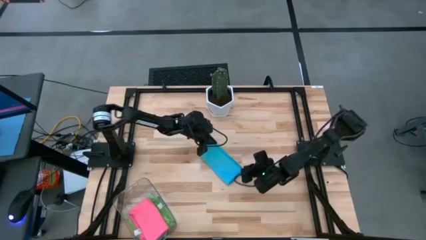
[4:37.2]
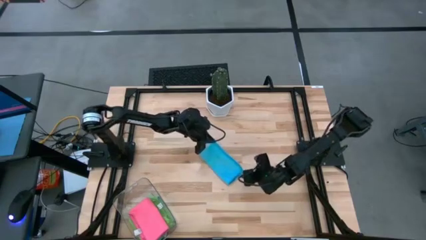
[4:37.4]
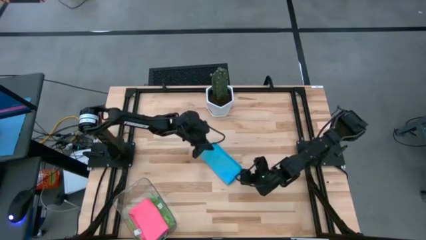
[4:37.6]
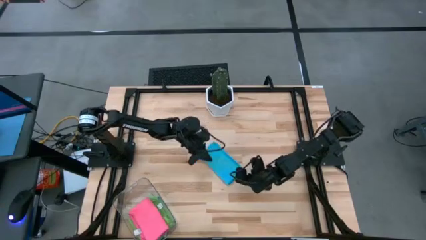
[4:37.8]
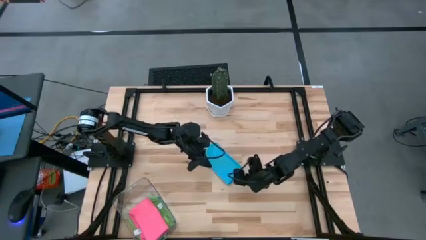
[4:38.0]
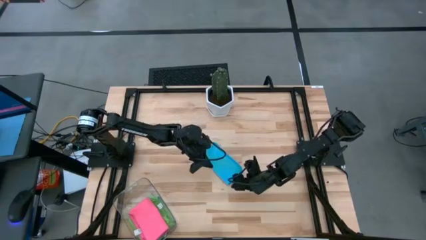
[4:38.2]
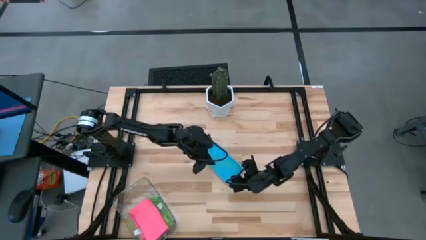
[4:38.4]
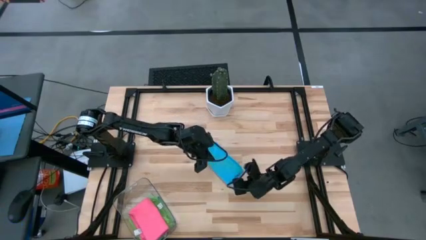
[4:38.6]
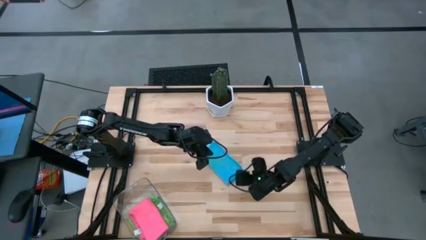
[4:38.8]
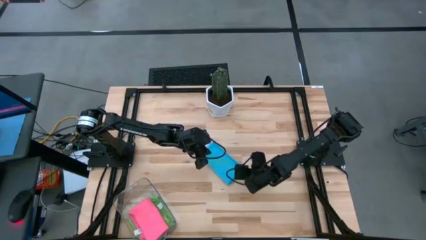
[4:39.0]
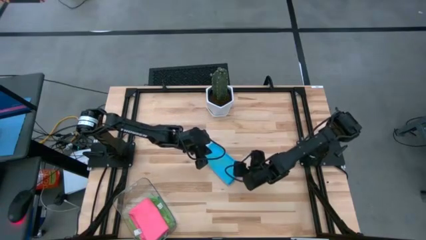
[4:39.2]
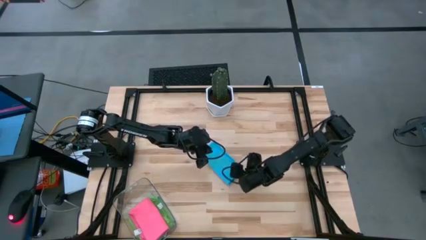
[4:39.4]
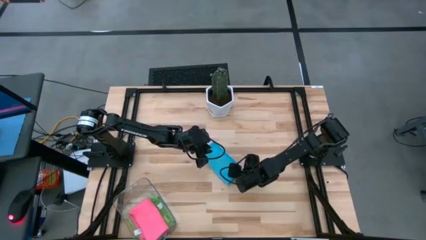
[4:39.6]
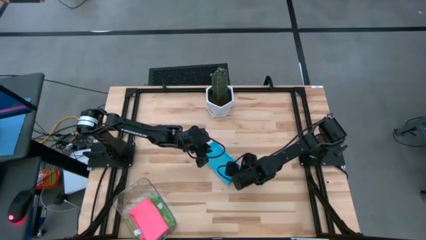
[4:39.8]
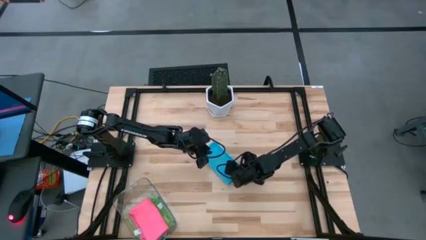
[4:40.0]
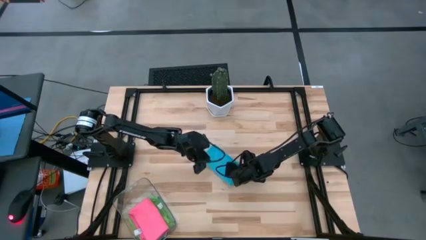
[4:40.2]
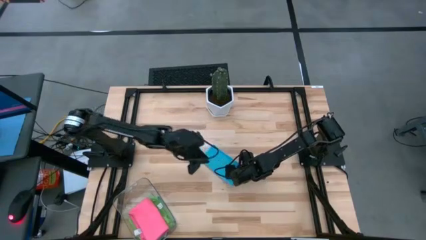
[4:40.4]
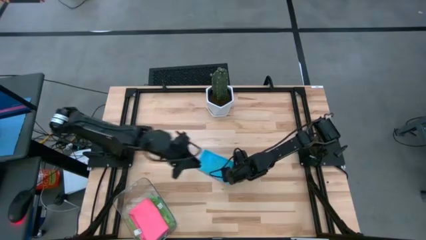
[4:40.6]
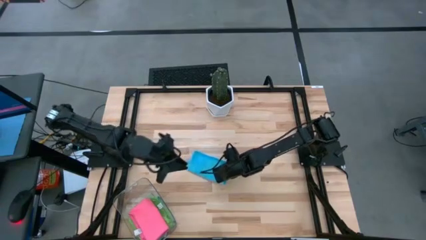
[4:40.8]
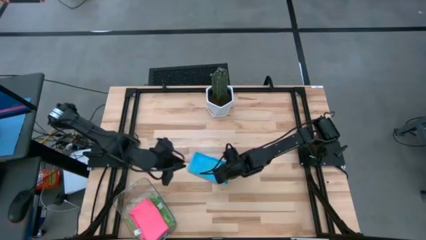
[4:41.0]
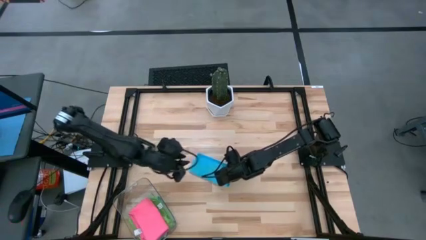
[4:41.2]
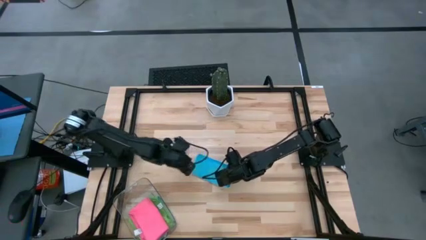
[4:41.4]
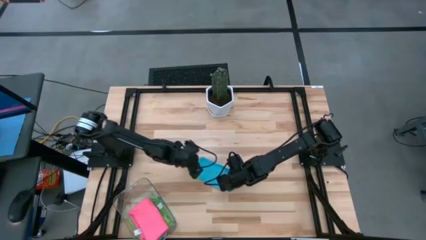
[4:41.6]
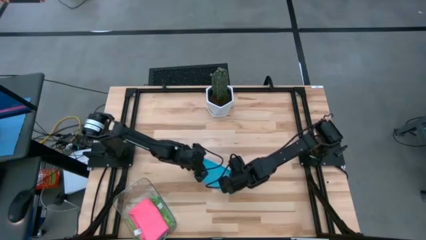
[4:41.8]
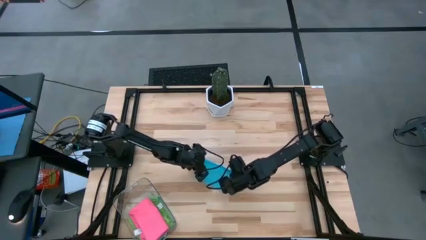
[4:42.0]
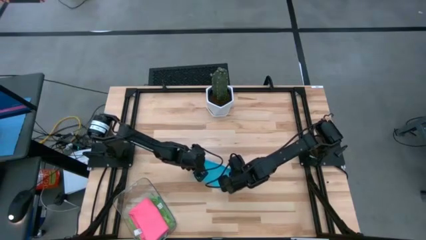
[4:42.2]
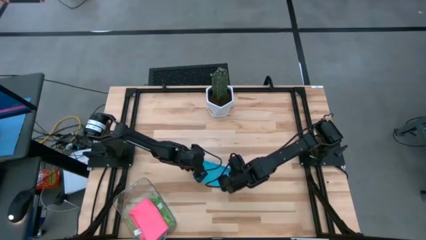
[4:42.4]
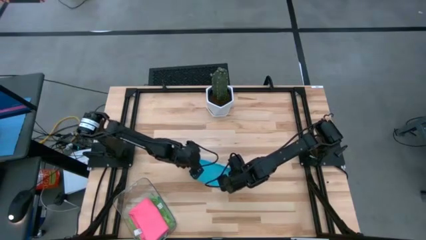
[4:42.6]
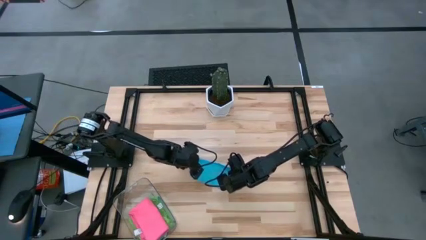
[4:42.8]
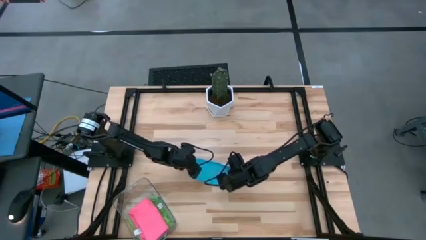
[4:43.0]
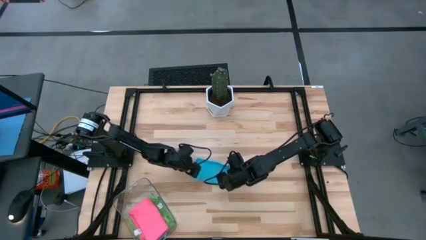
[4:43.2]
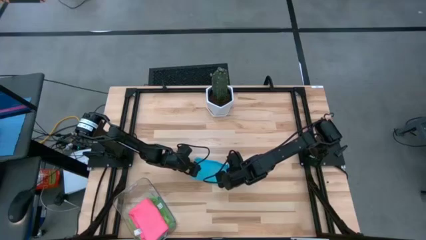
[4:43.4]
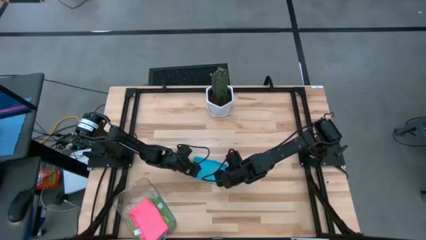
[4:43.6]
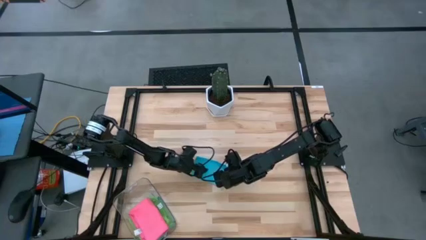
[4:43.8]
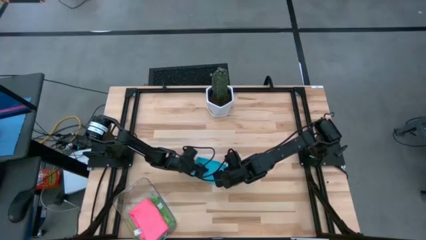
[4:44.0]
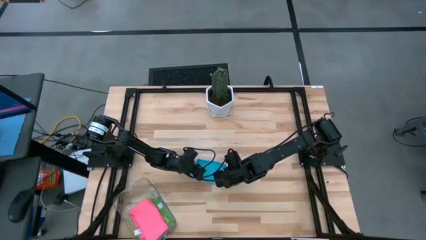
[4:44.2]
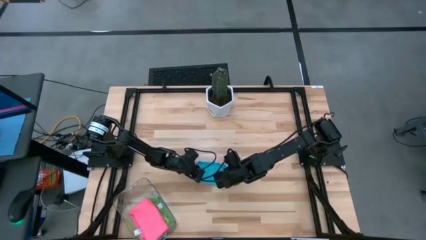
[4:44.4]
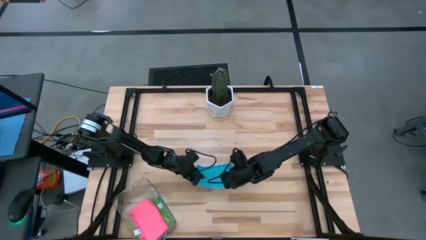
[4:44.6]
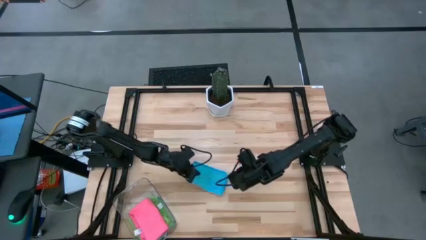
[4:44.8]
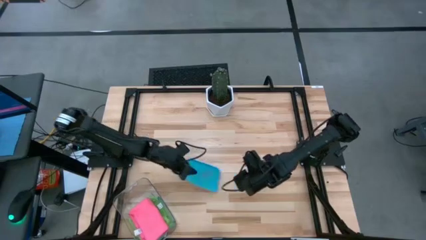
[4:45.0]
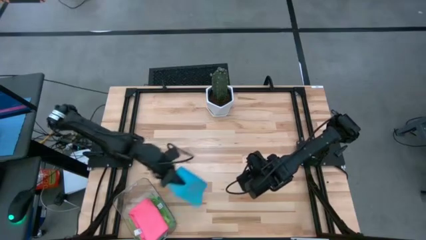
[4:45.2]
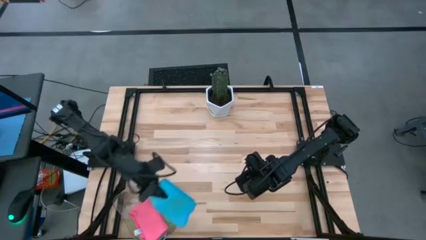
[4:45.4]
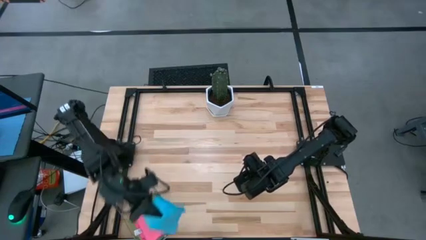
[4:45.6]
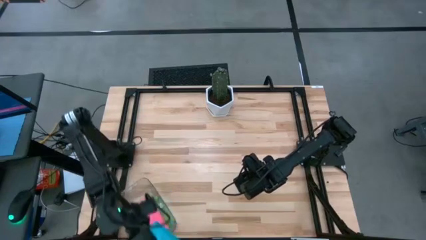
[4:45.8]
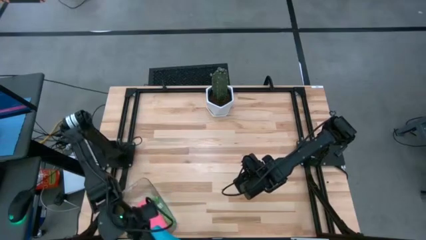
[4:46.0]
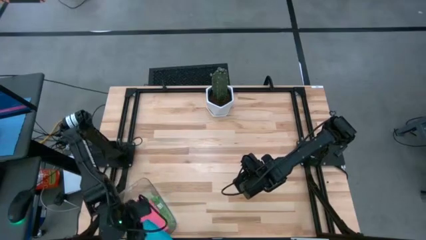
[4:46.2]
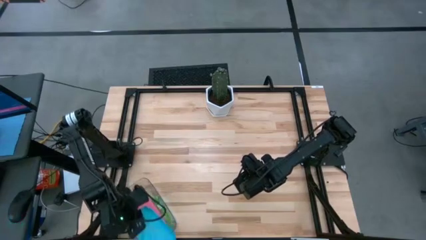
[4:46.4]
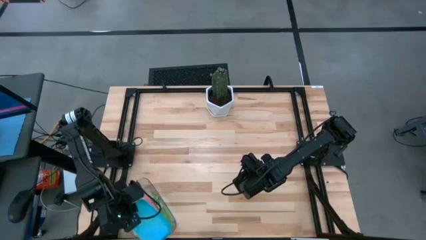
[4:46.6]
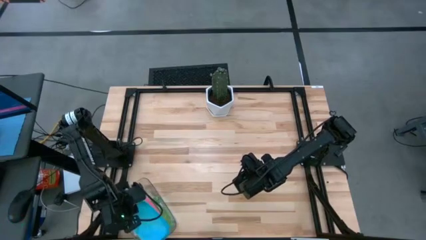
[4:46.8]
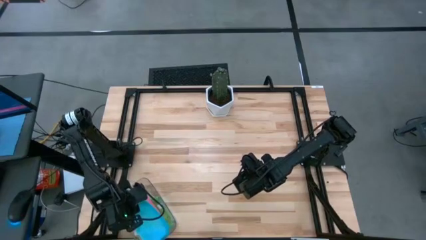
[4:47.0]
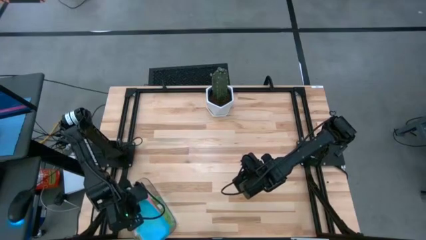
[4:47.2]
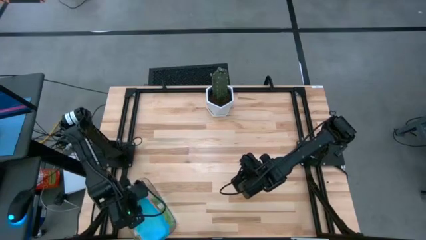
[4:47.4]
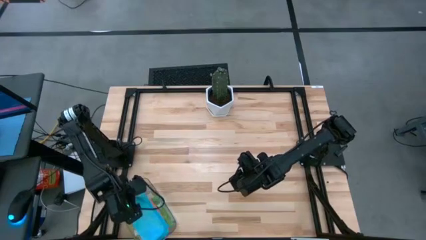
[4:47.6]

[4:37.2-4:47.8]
Task: Fold microfiber towels
Put the folded blue microfiber cloth into the transparent bin

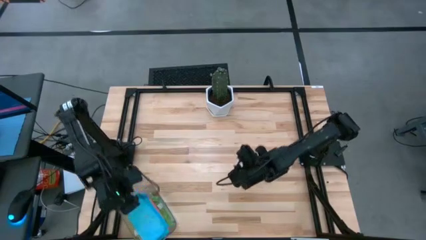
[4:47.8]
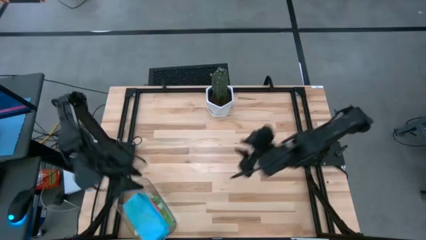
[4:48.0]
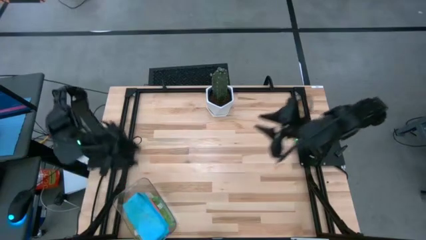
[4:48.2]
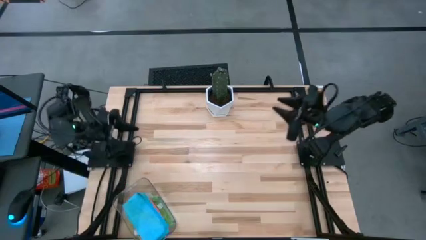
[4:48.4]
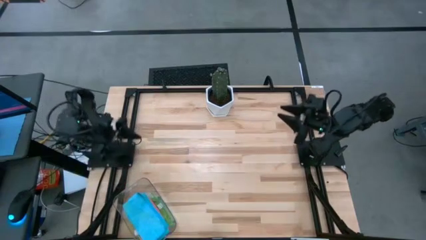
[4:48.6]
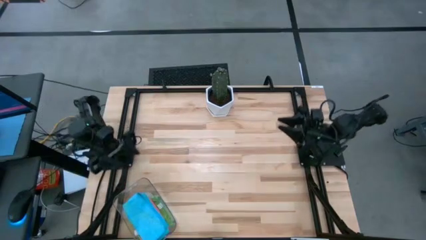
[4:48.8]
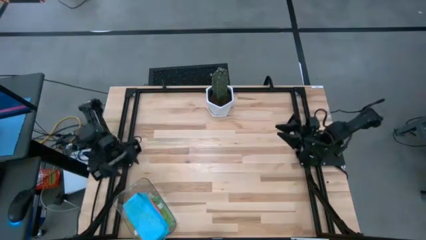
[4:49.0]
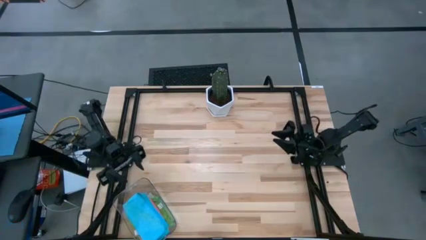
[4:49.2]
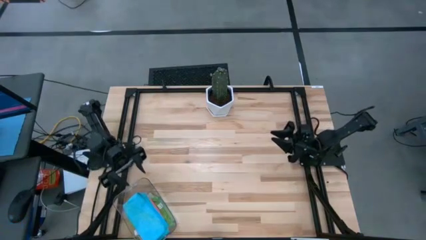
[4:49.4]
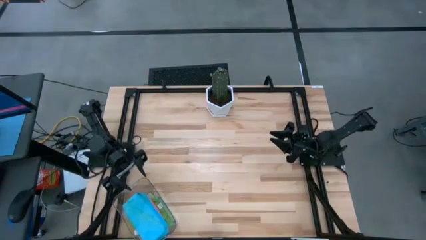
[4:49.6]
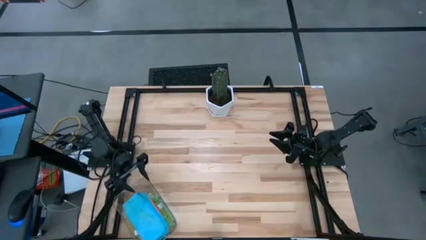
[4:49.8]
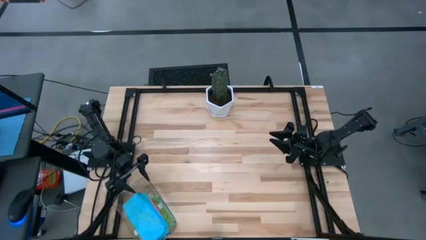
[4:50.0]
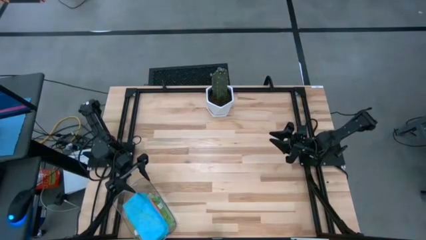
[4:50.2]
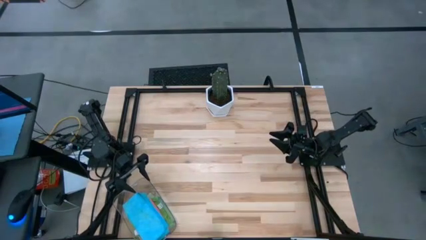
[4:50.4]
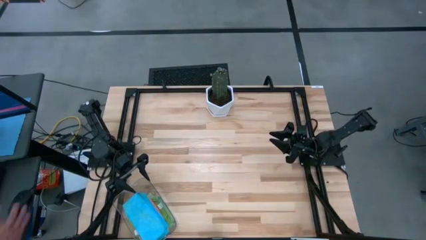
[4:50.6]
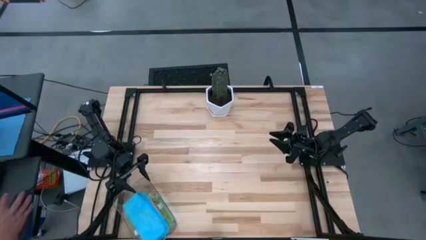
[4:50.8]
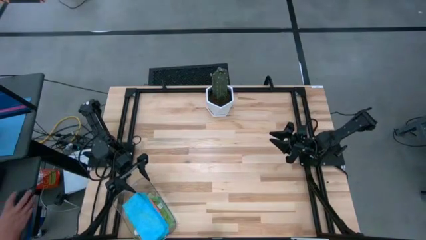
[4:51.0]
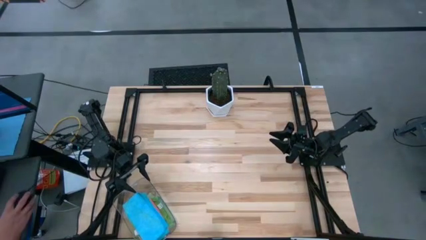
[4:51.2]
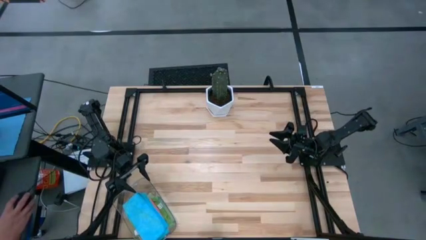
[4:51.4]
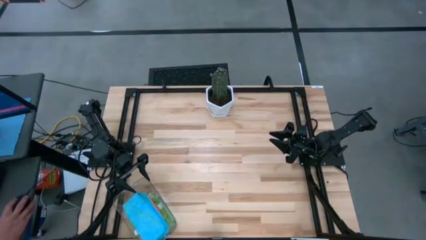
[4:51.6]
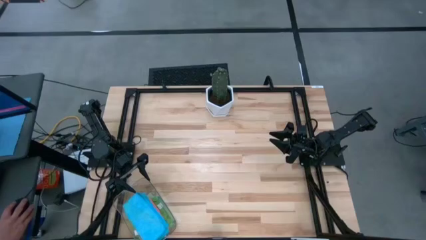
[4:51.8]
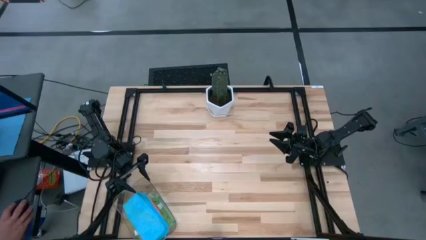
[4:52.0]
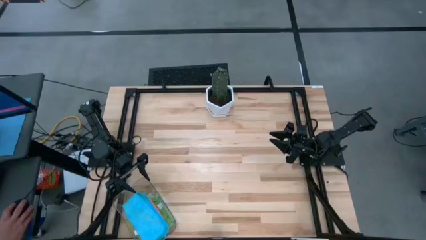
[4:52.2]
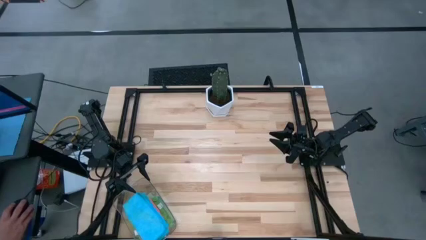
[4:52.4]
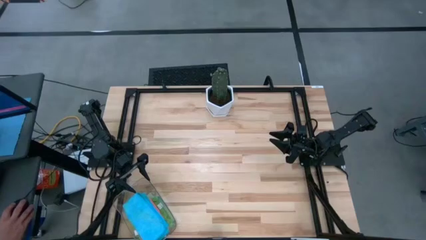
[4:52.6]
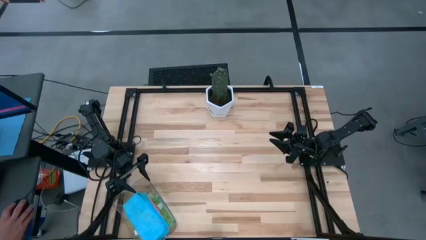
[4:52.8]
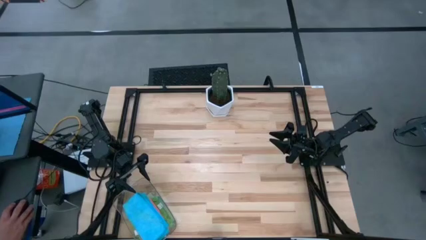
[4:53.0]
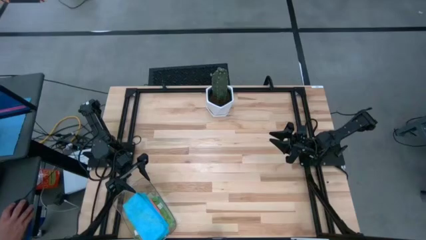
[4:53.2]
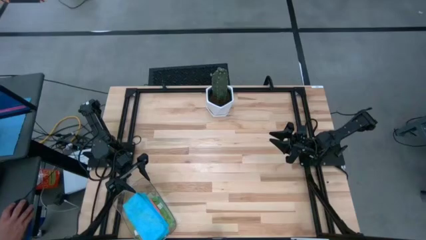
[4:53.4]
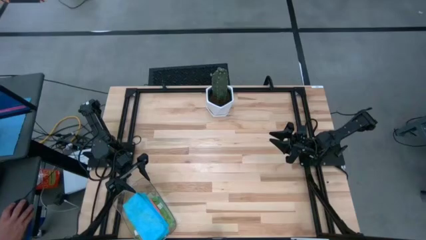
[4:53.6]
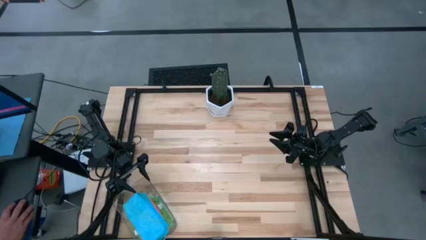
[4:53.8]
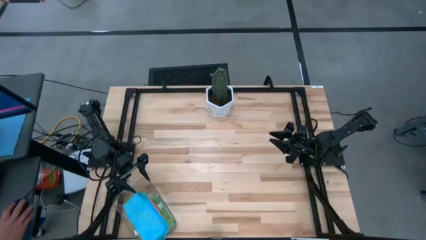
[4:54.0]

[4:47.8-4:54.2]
Return to Home Position
